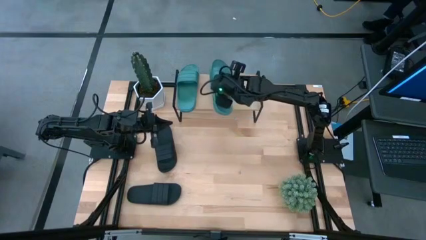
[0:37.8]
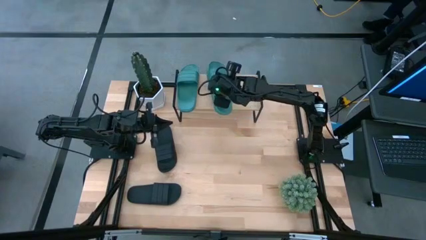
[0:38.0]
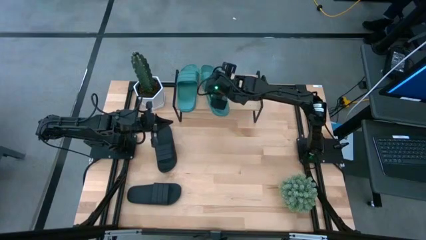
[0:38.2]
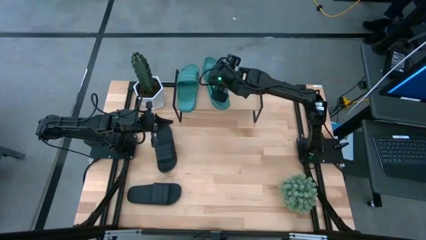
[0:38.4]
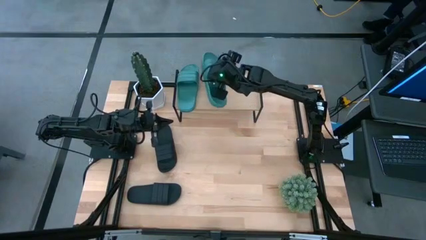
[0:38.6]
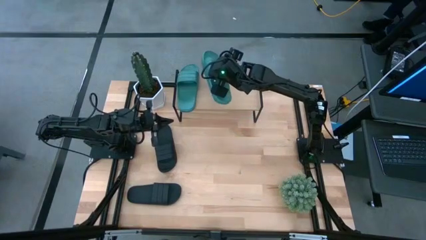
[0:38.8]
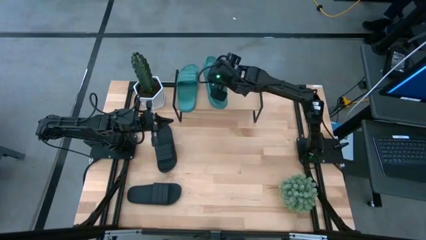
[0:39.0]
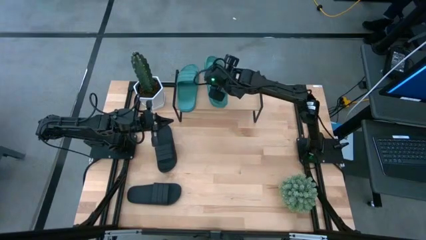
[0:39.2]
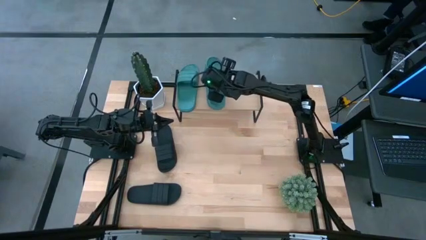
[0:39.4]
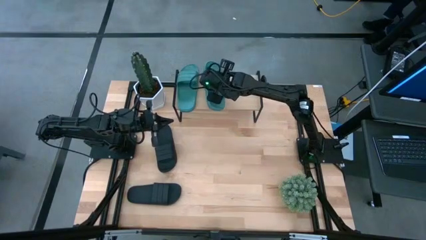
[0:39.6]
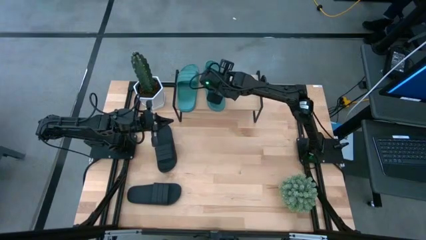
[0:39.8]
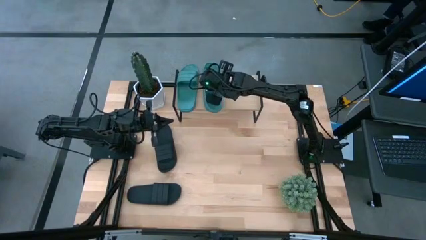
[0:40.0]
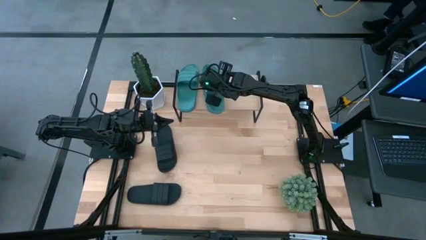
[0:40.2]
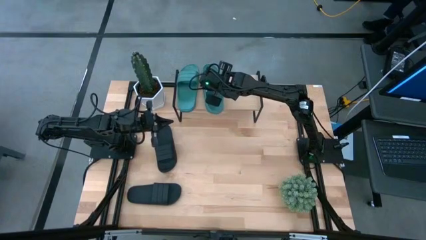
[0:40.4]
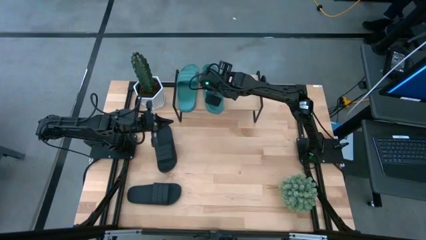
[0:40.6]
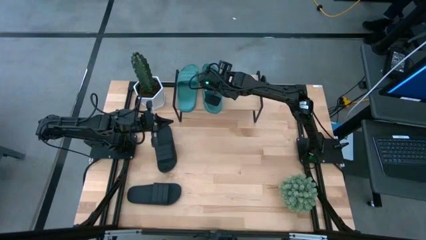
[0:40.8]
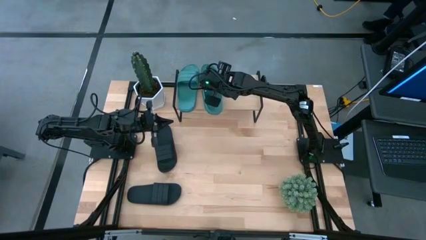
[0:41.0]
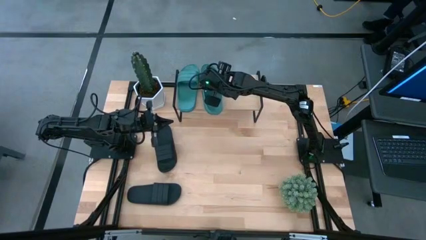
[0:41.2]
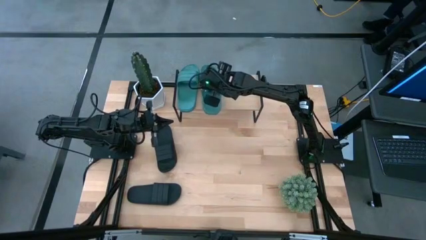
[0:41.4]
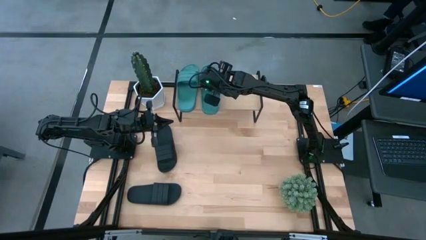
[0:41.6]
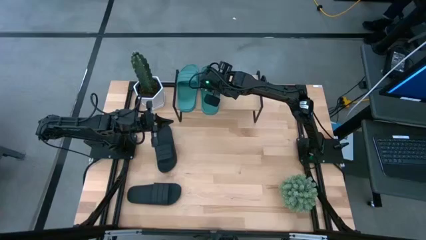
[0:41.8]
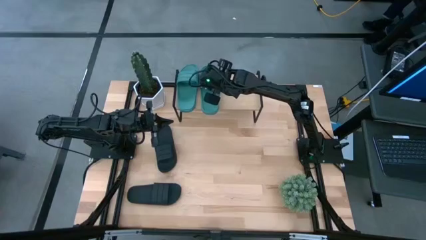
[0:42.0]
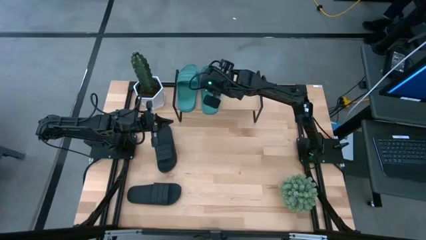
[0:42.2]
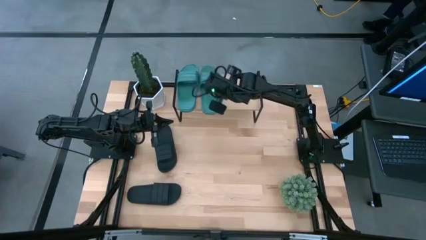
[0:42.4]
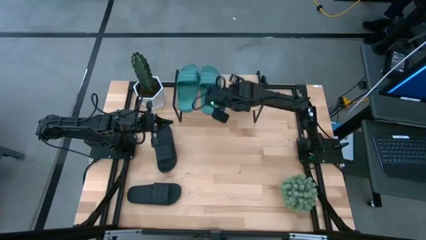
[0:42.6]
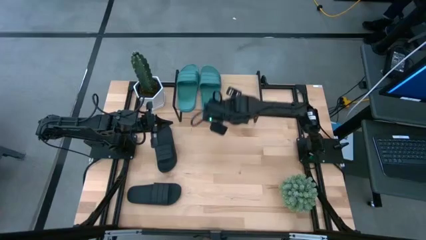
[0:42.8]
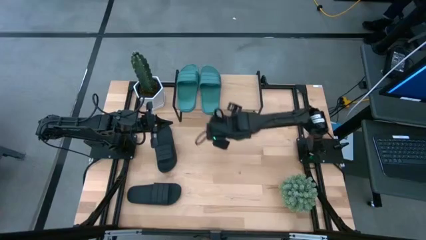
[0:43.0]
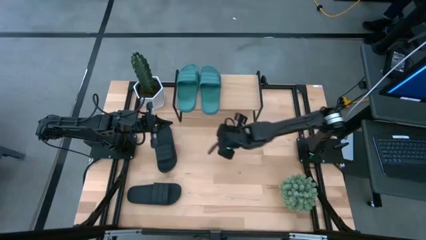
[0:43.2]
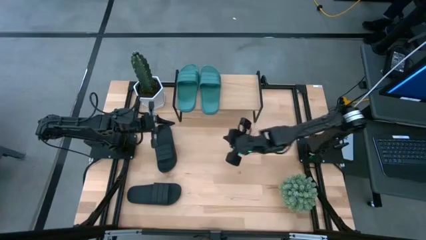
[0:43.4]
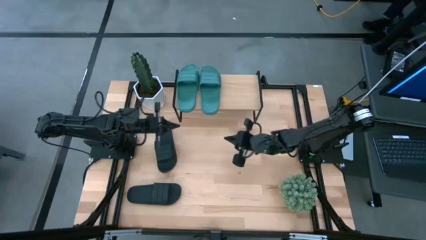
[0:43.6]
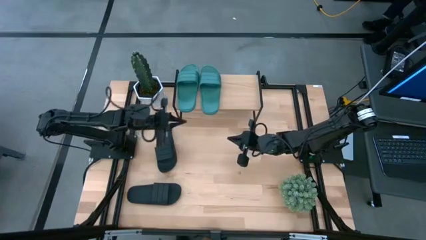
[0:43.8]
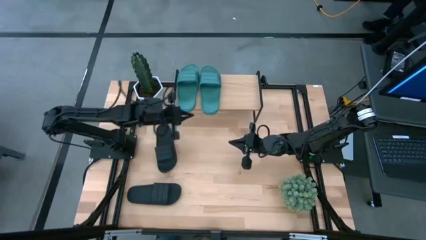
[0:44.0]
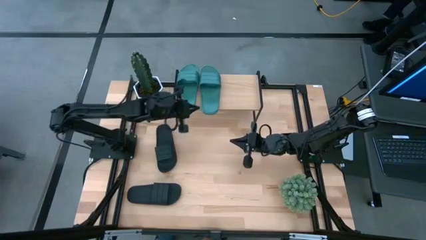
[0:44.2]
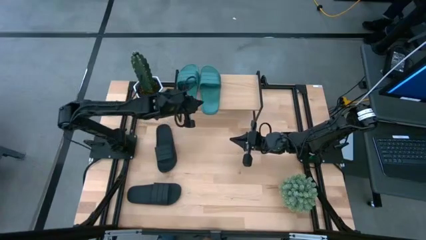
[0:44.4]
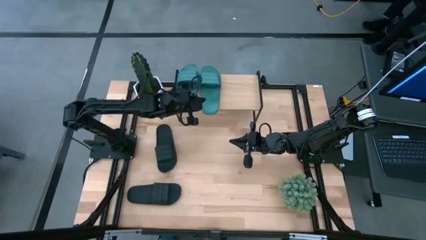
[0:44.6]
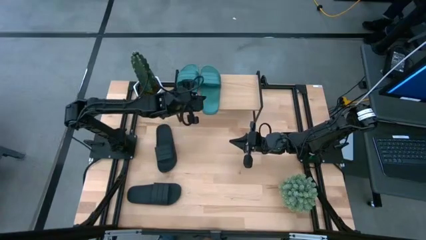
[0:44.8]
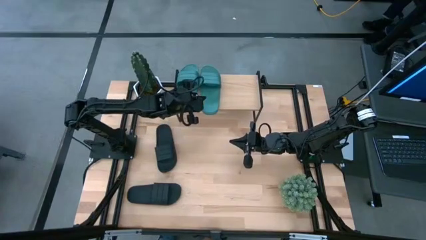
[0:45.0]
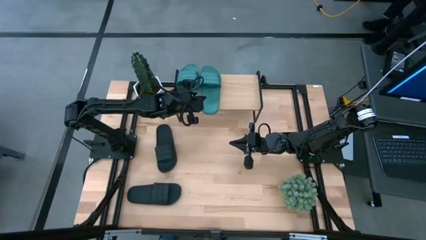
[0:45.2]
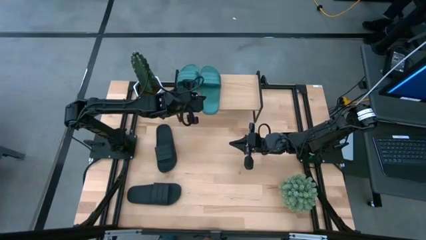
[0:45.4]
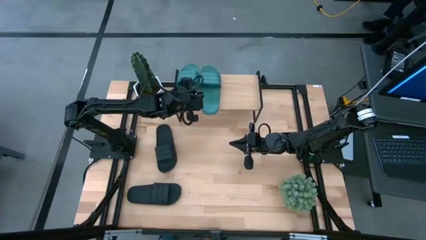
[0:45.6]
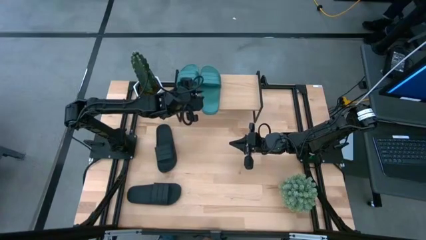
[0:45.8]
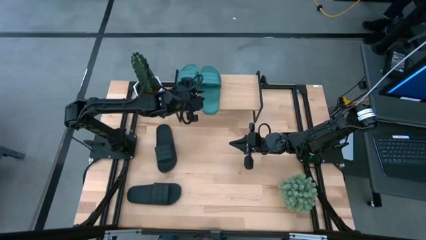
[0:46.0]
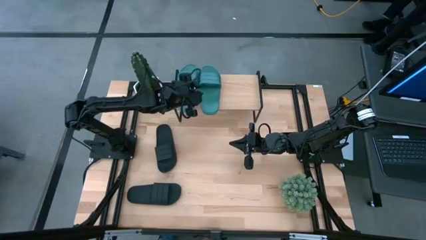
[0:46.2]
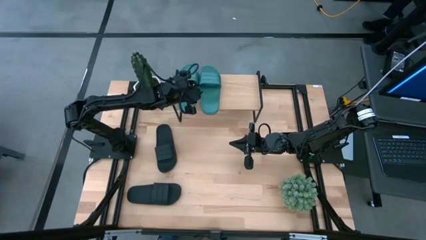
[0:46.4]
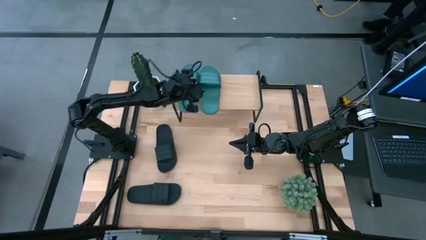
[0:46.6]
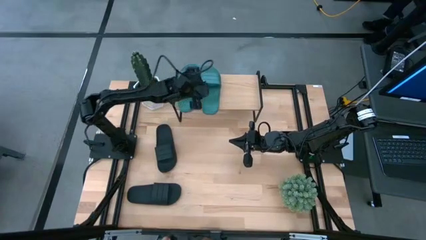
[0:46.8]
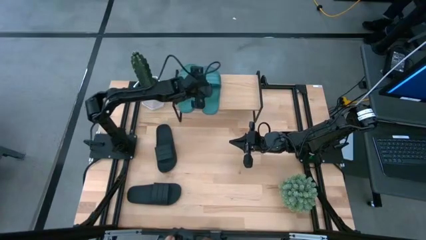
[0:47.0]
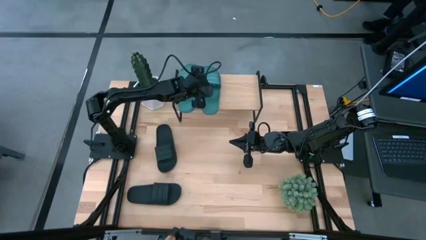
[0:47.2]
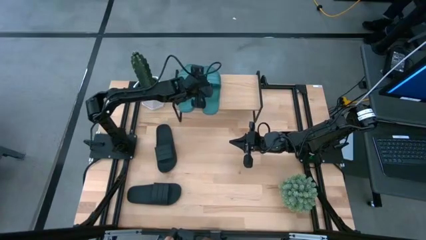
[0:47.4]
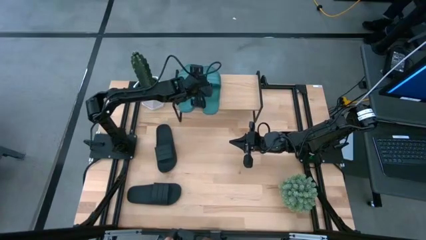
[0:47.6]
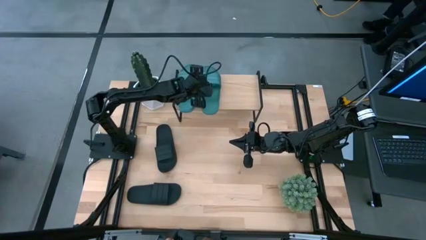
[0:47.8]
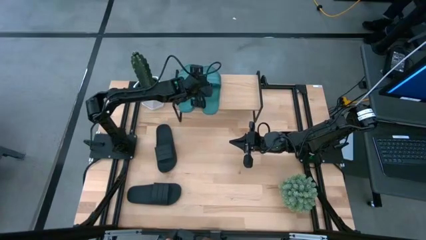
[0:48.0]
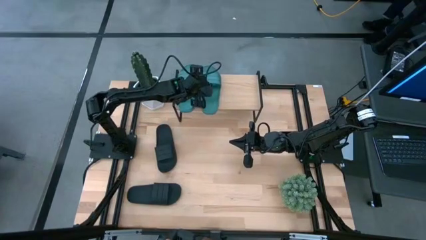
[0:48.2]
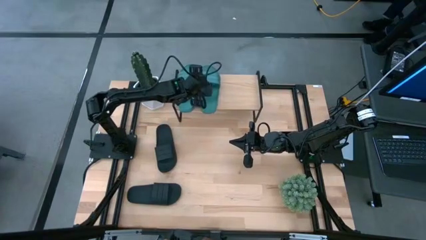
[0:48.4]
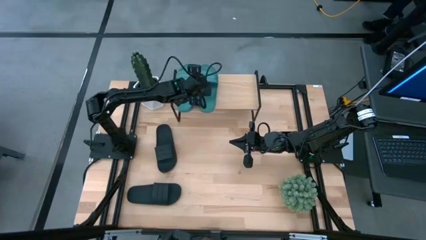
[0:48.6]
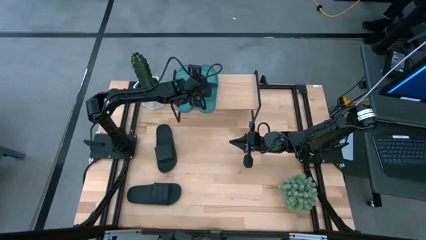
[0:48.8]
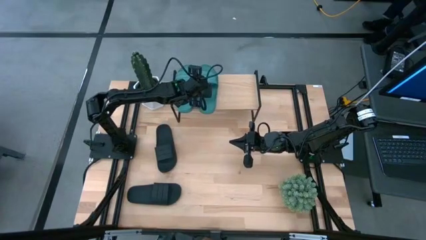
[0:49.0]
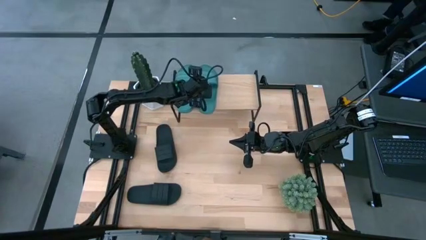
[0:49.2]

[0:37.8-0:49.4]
Task: Pick and place slides into the shelf
Put the green slipper on the shelf

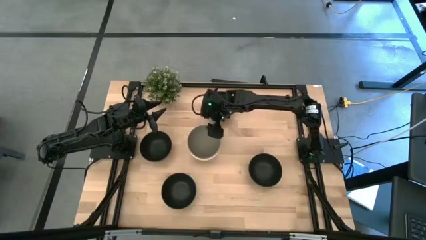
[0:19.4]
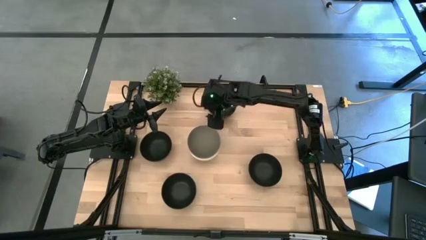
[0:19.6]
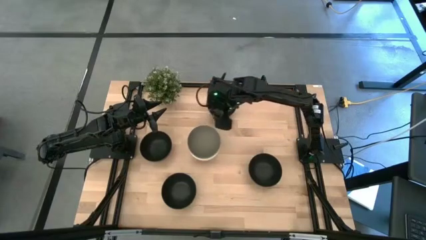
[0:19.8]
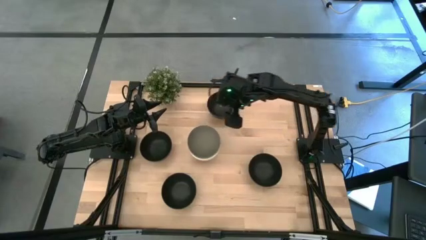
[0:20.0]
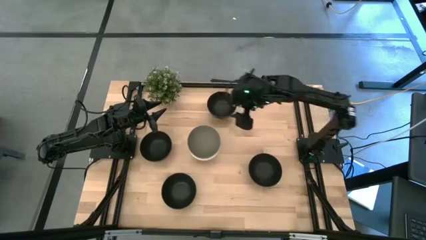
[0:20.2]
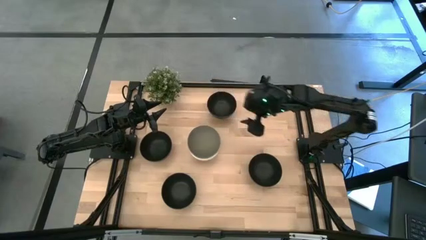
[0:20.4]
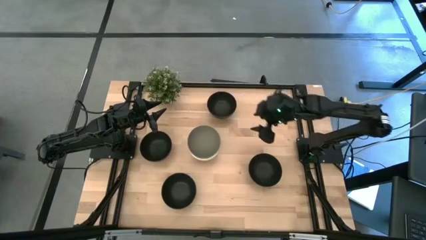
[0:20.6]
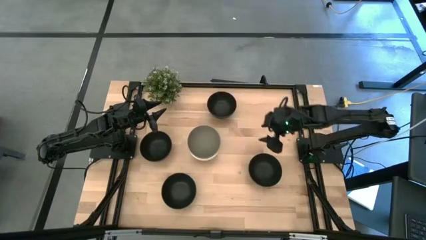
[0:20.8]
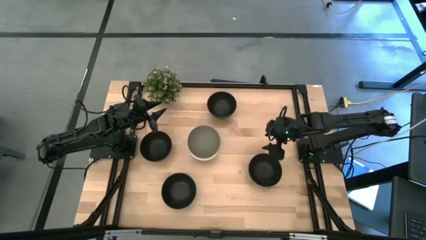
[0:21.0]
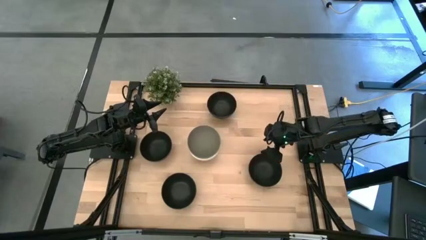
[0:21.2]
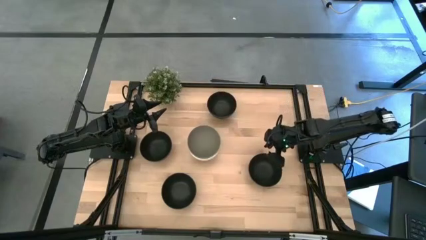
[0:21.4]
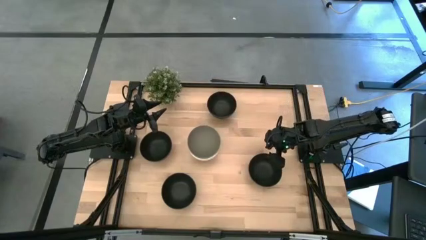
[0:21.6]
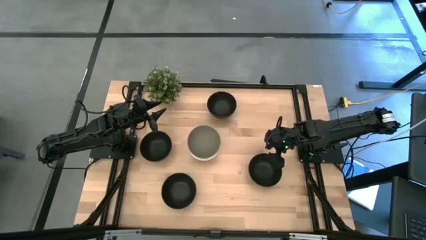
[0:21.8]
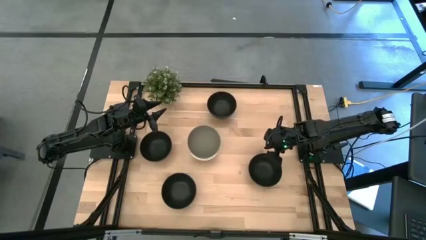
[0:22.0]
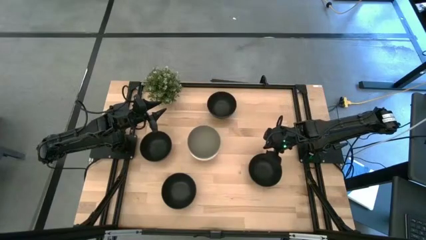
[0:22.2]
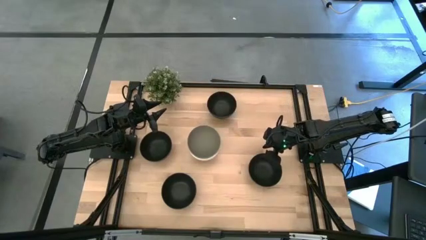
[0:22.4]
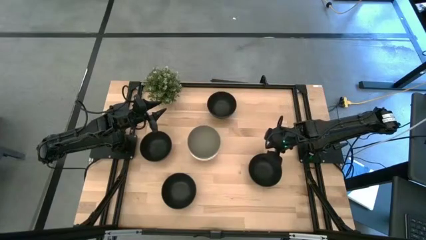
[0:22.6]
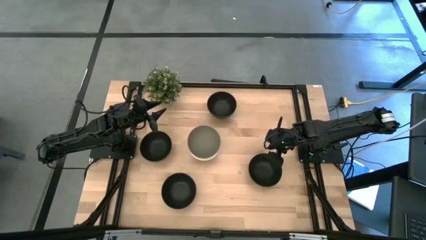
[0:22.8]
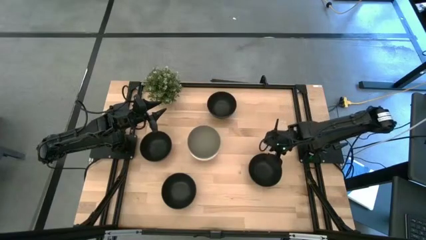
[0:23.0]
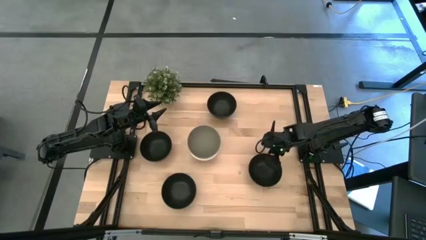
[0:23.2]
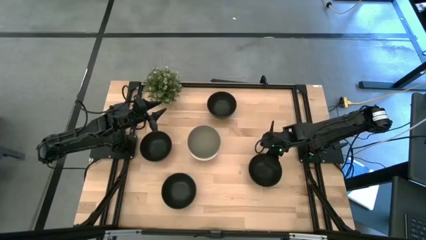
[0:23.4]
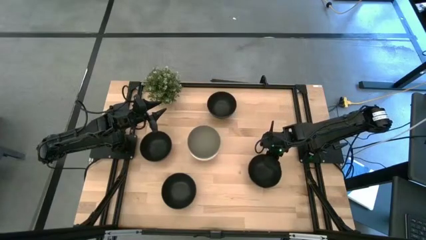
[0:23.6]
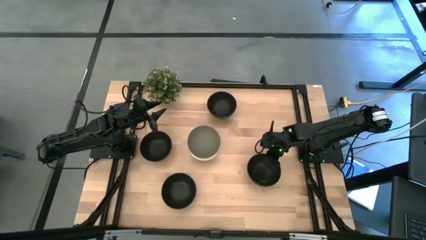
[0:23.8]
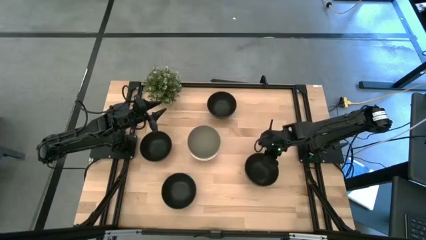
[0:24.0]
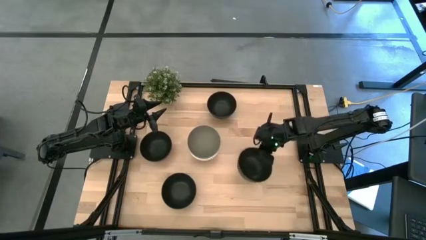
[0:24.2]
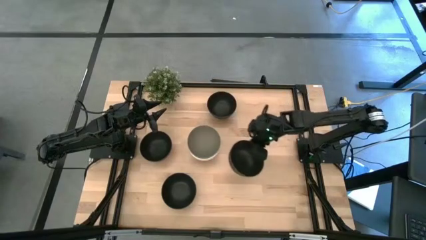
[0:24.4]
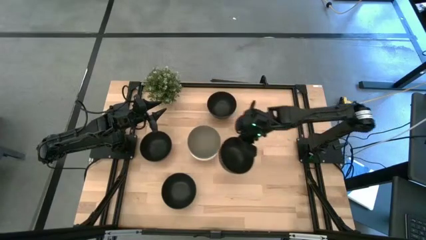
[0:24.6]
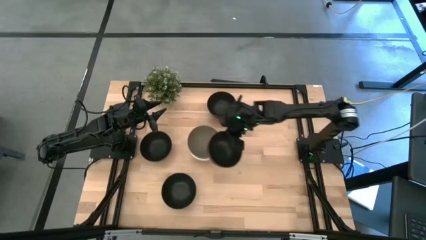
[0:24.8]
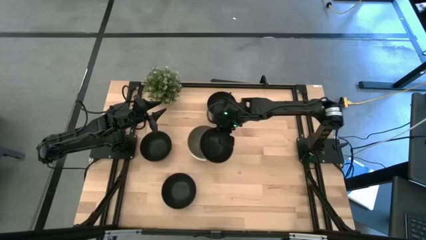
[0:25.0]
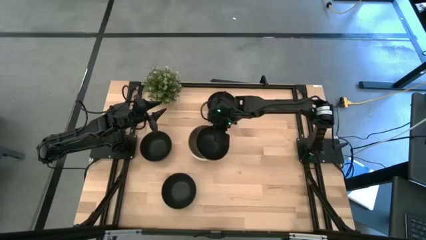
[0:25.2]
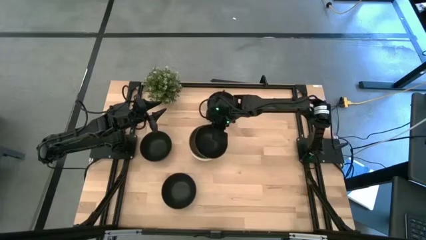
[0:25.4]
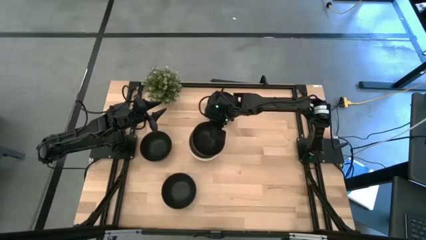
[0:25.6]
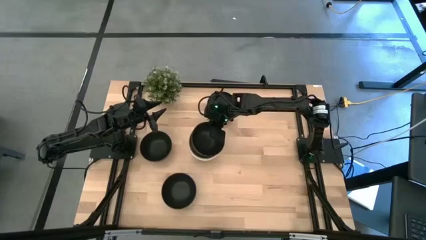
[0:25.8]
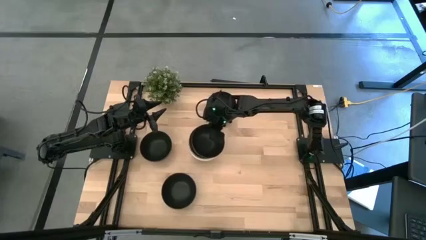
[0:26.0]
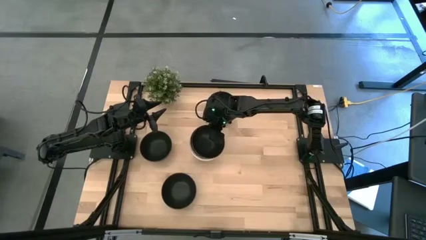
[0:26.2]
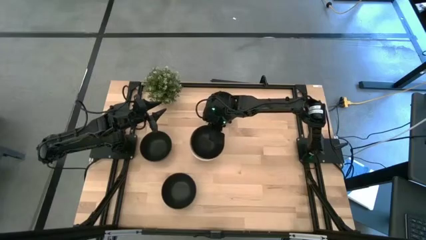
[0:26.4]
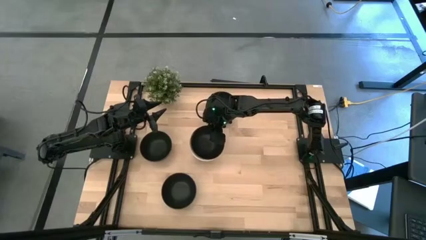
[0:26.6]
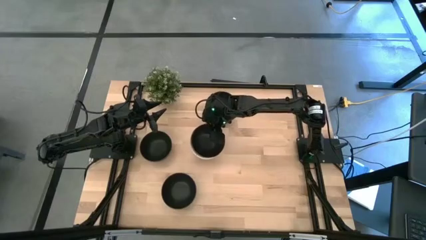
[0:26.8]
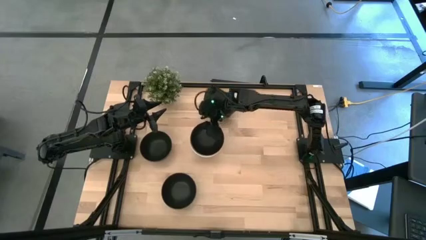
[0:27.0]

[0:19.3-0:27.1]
Task: Nest bowls inside each other
Stack the black bowl on the gray bowl
